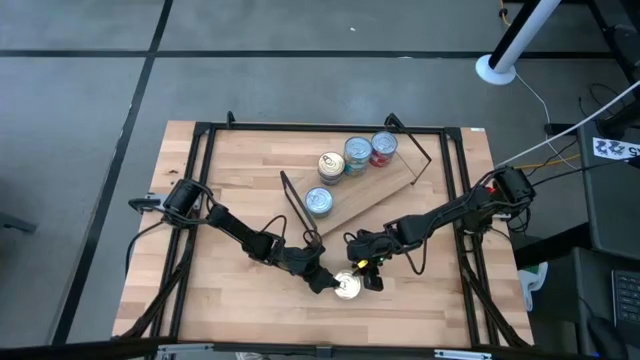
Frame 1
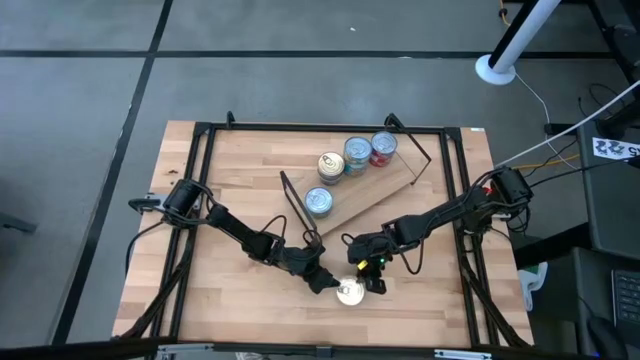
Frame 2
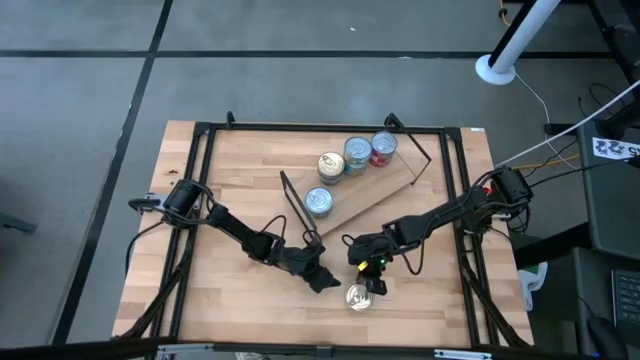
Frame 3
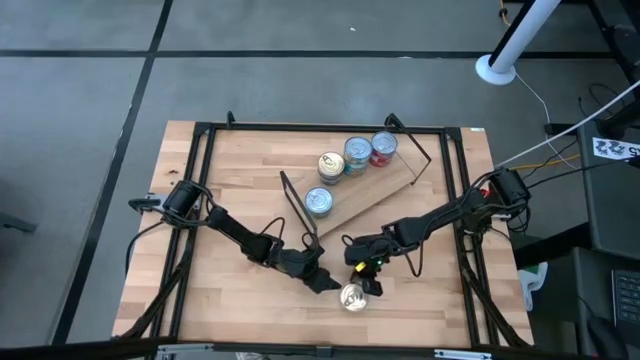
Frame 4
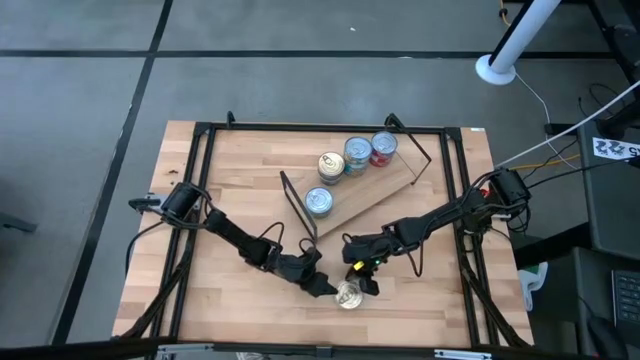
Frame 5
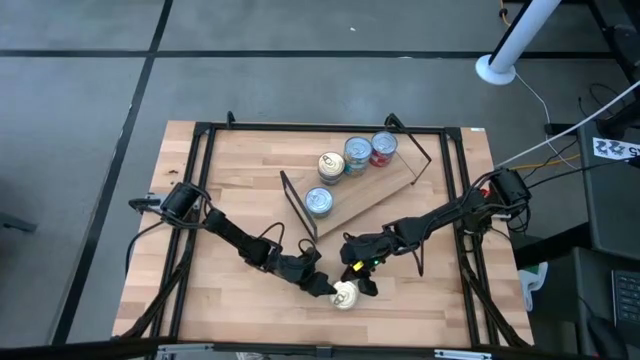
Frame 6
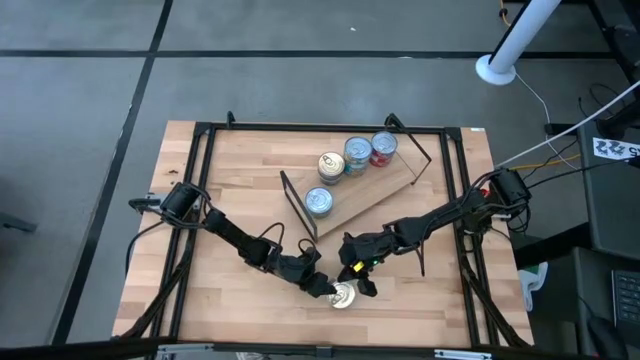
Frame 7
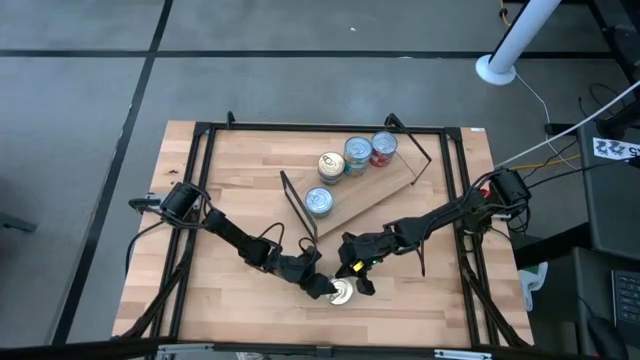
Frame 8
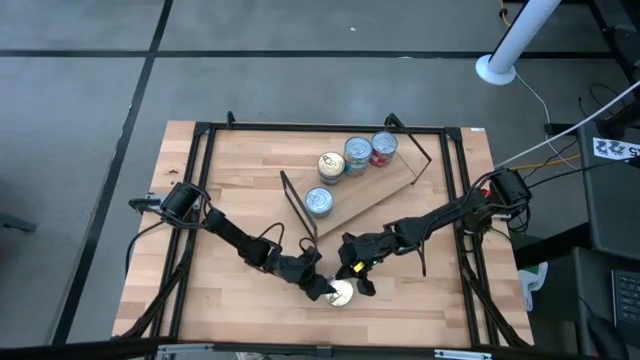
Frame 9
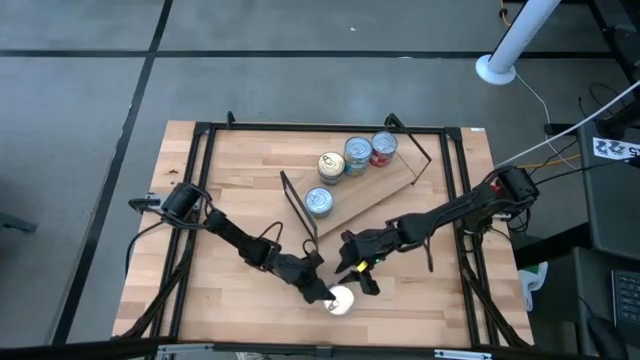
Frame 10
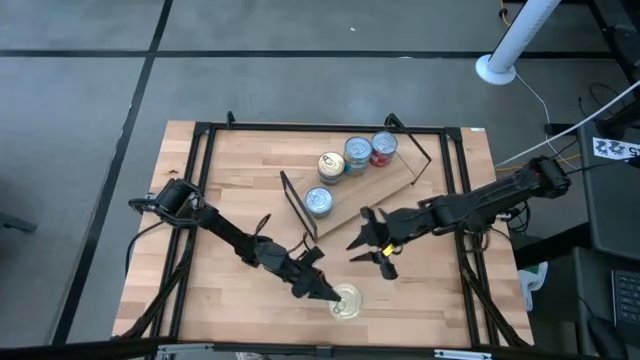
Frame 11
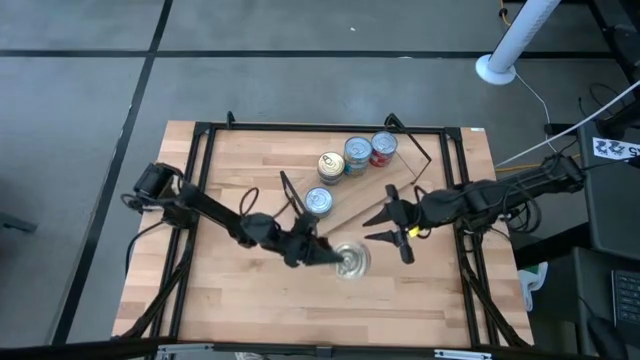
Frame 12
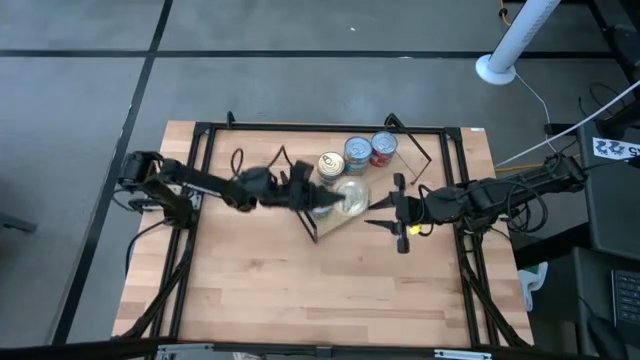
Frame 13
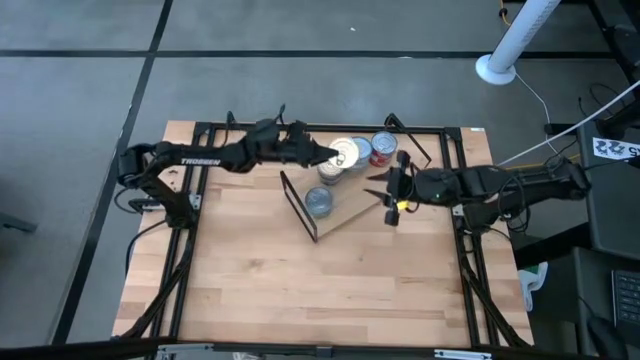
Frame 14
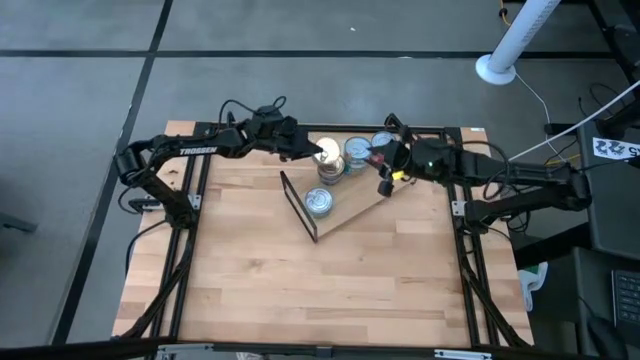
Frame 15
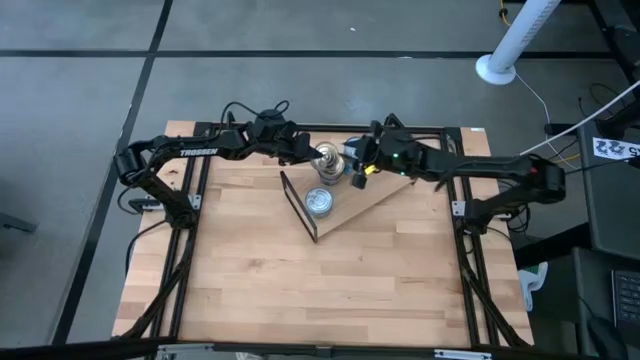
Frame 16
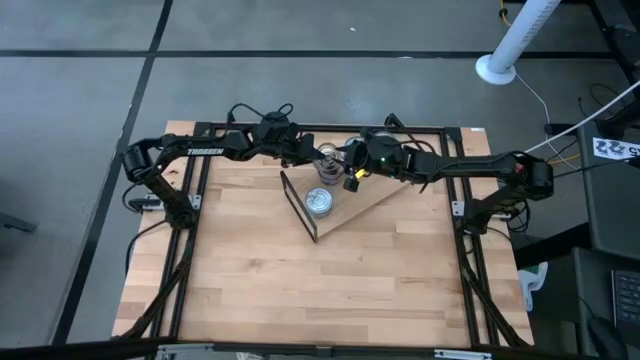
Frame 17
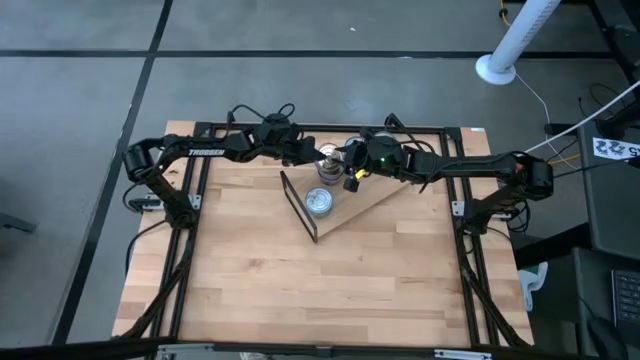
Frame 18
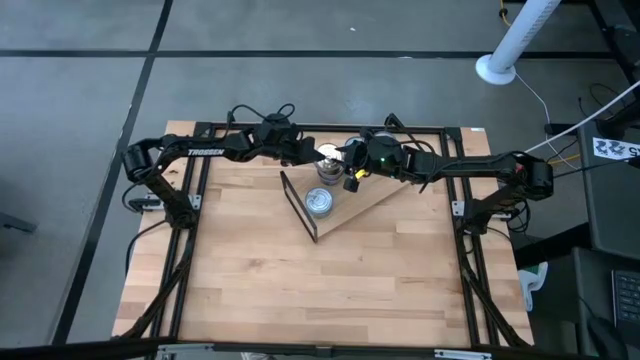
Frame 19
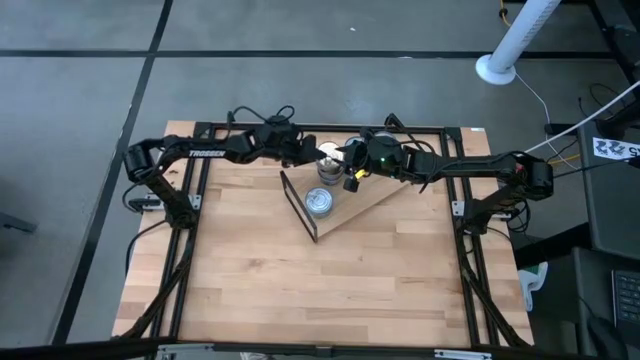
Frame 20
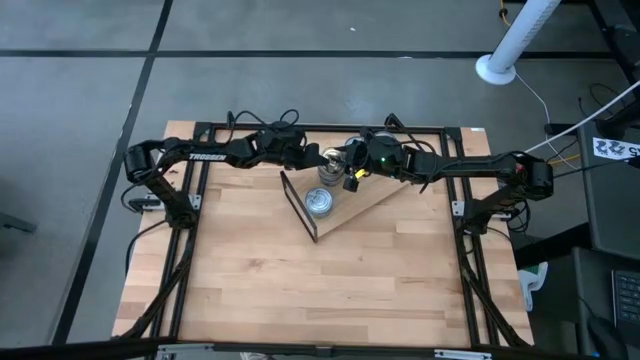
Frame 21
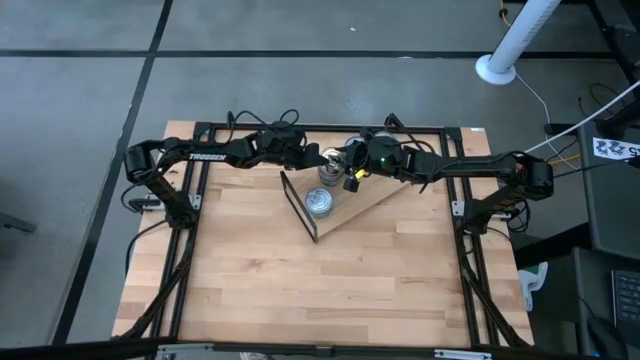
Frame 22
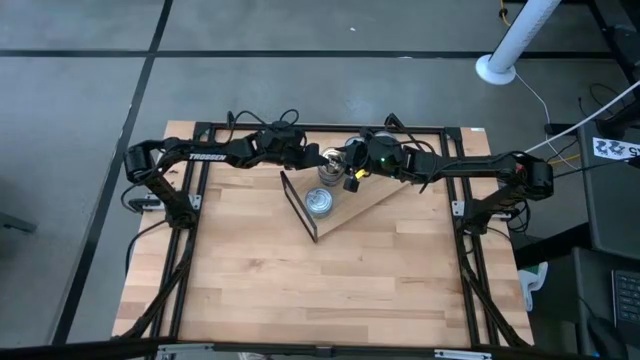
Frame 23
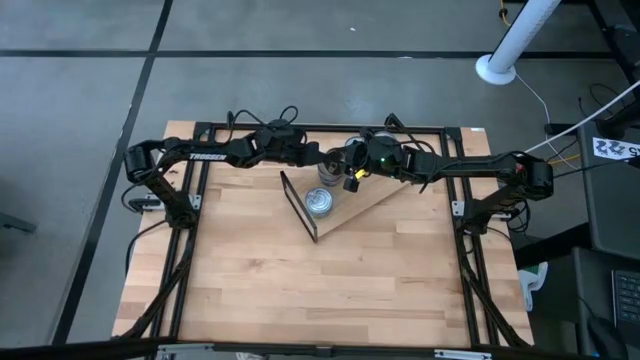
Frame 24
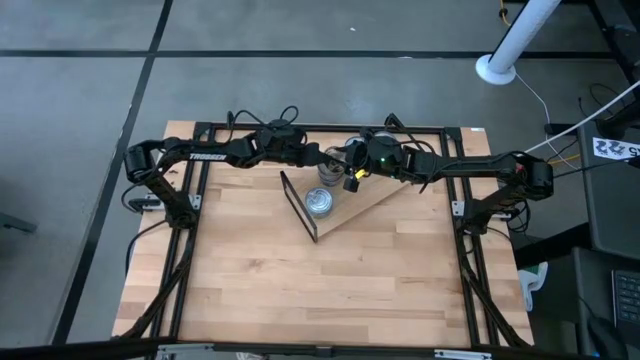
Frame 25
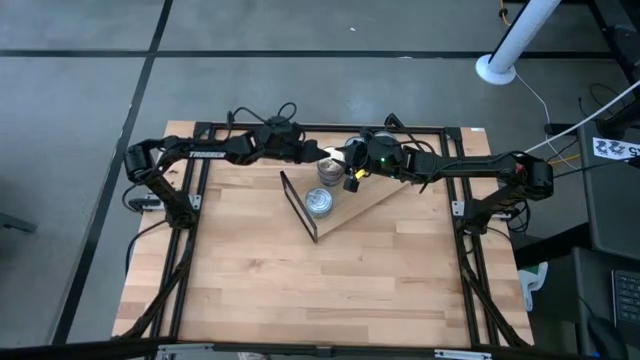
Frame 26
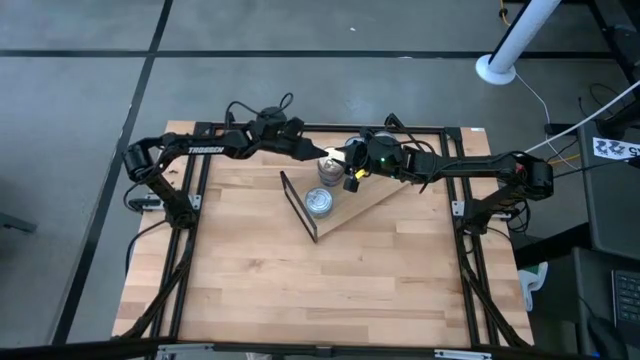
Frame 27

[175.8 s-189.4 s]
Task: Stack canned seafood by type on shelf
Stack the blue tuna can on top of the blue tuna can on the shelf

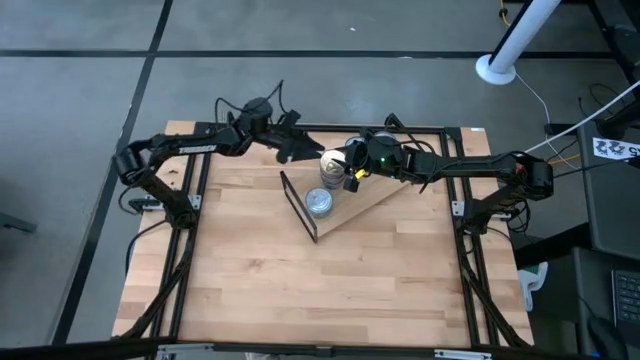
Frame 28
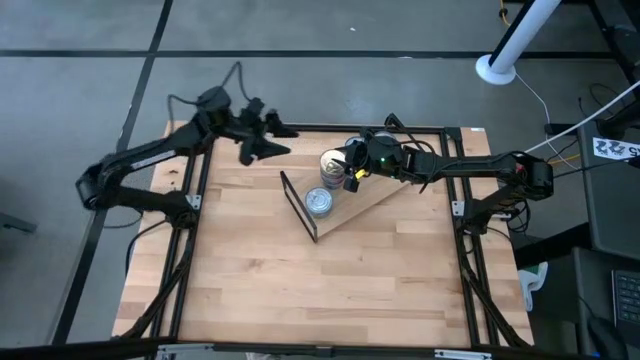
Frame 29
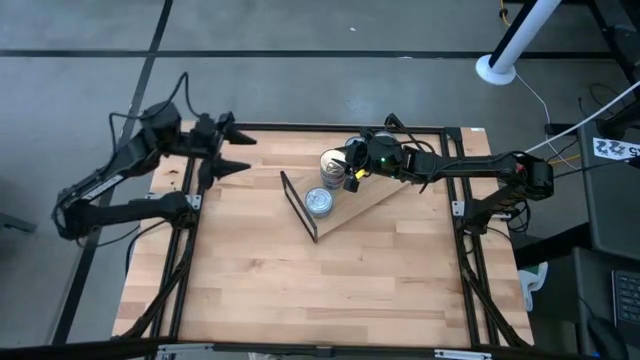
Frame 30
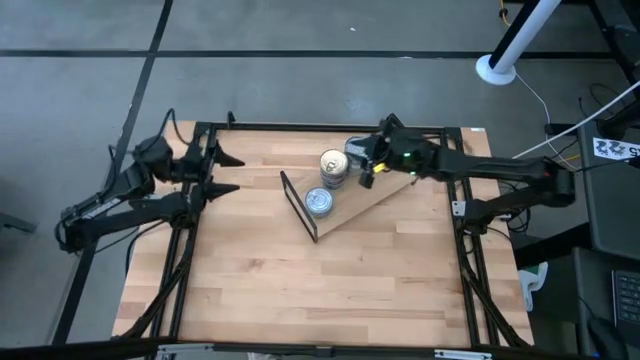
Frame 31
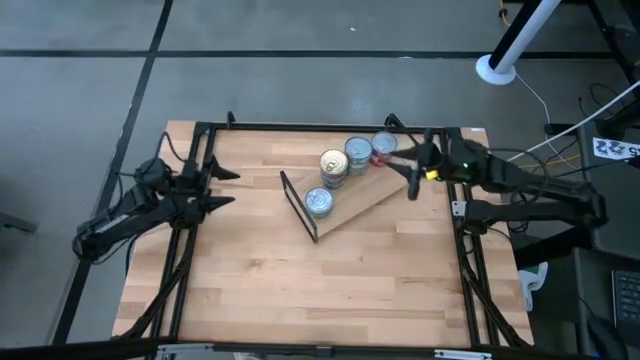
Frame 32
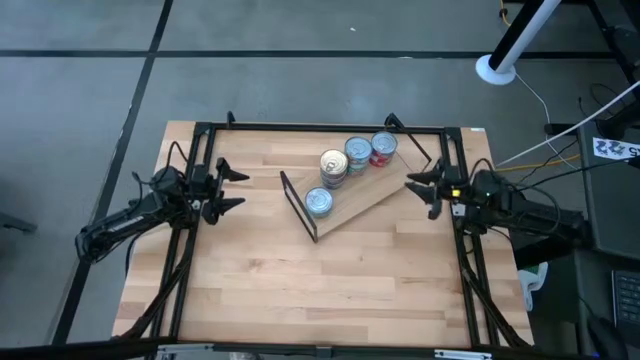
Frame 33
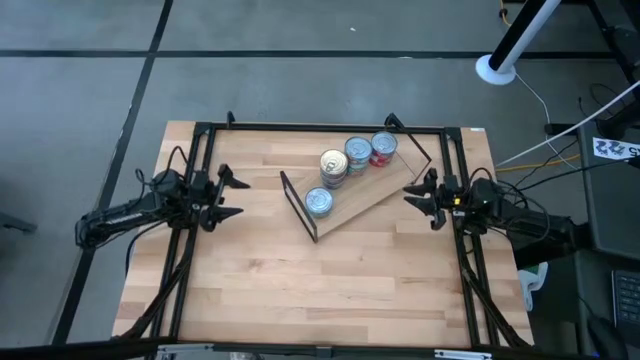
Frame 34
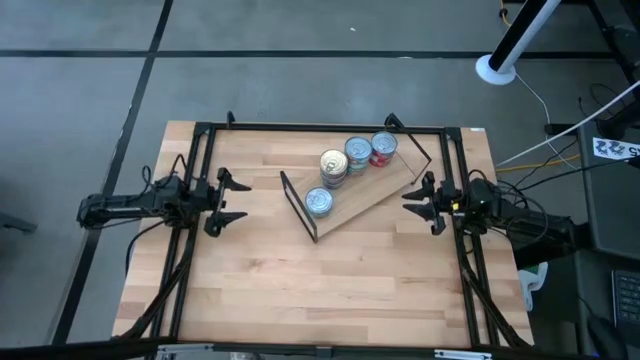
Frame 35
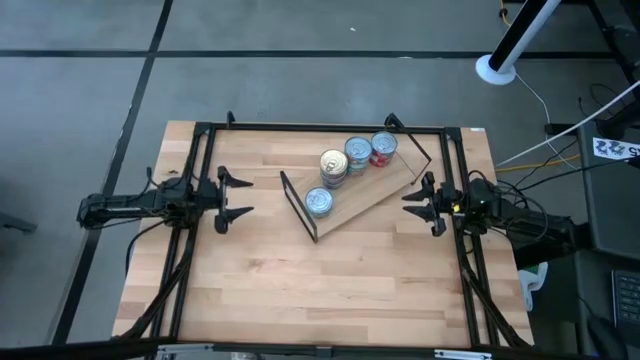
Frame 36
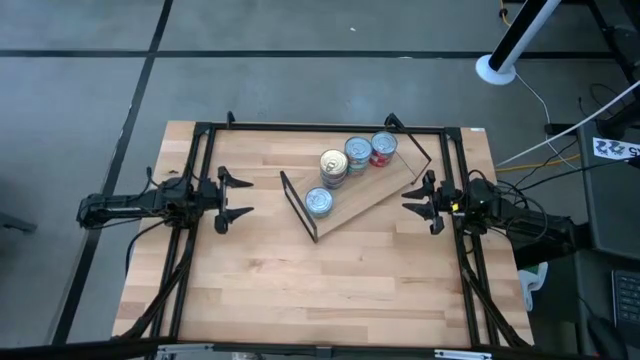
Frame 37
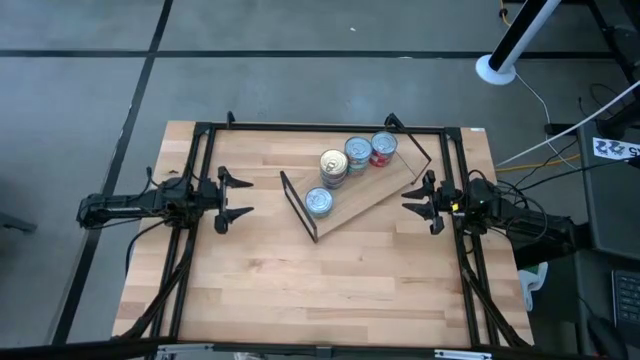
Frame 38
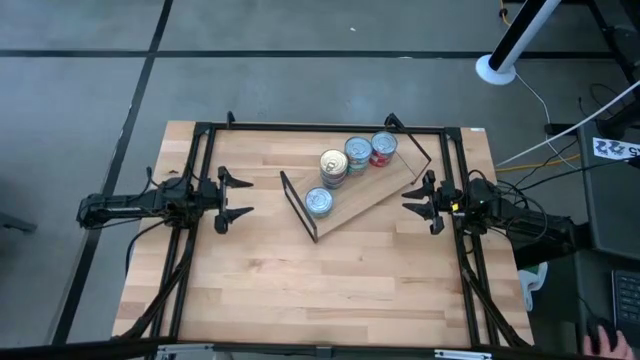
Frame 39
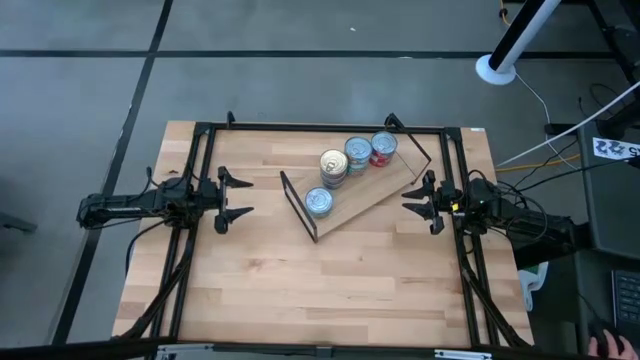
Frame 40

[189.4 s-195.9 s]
Return to Home Position
